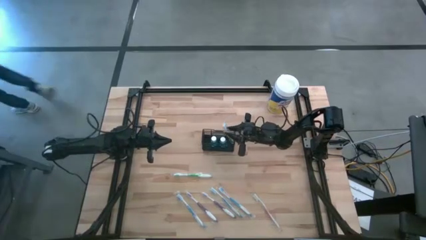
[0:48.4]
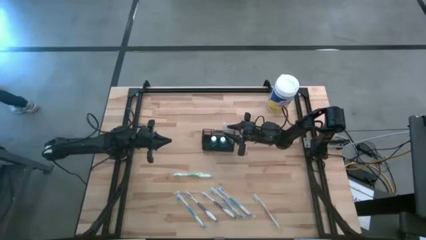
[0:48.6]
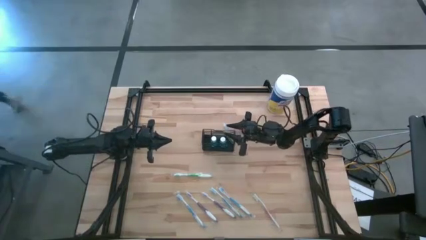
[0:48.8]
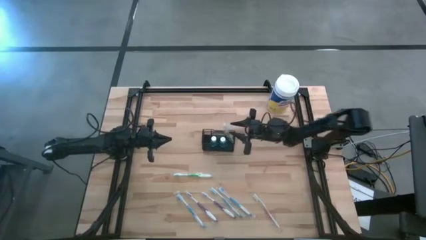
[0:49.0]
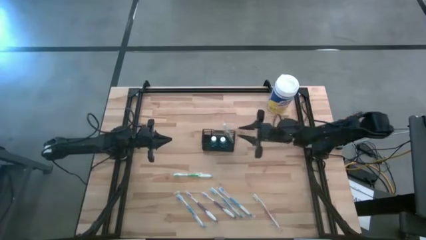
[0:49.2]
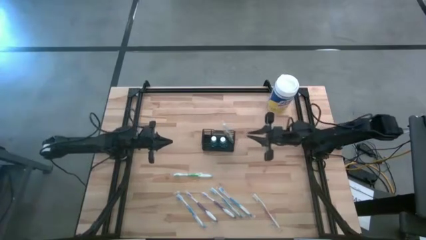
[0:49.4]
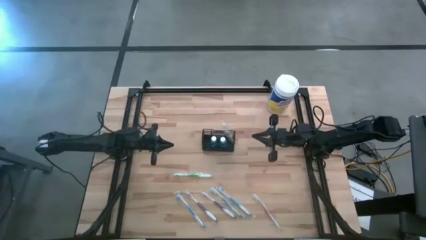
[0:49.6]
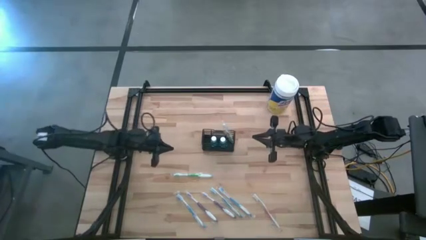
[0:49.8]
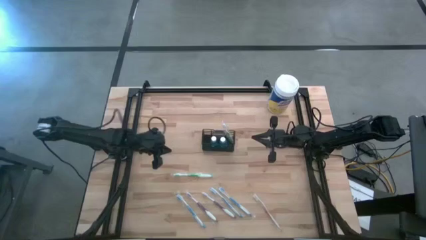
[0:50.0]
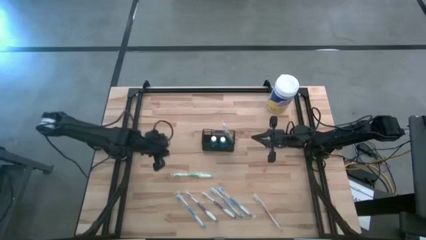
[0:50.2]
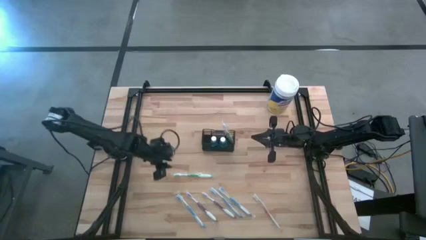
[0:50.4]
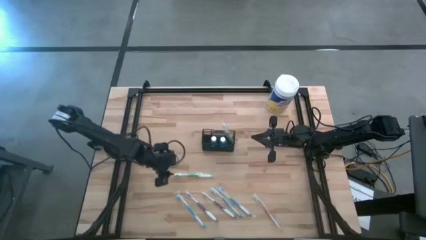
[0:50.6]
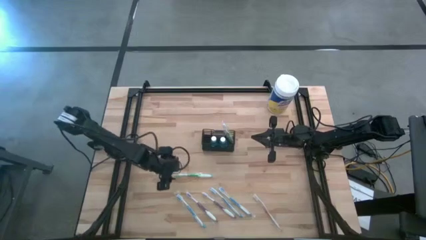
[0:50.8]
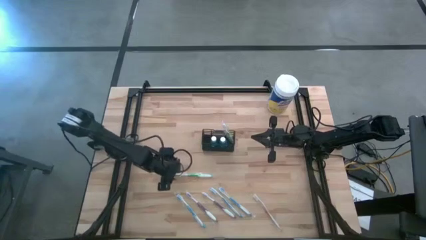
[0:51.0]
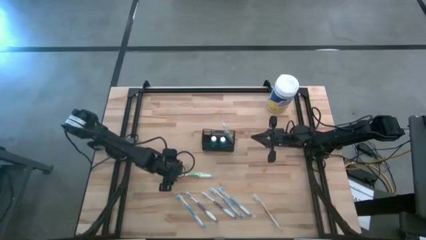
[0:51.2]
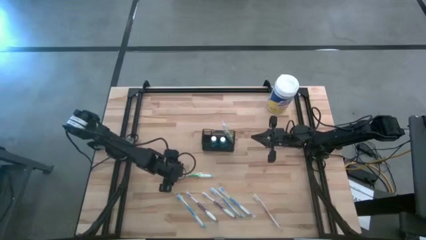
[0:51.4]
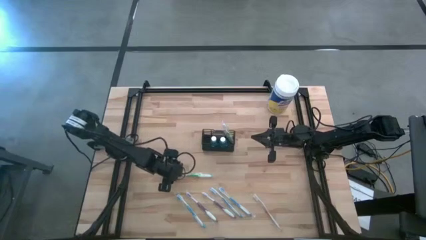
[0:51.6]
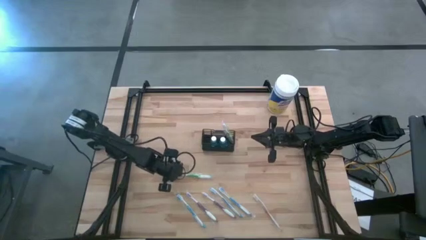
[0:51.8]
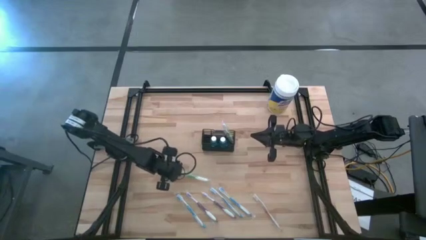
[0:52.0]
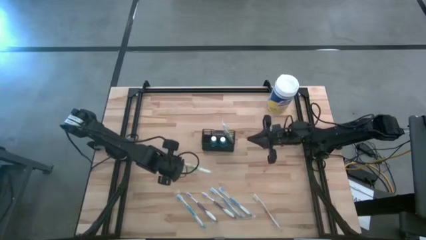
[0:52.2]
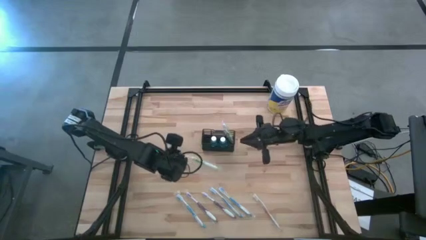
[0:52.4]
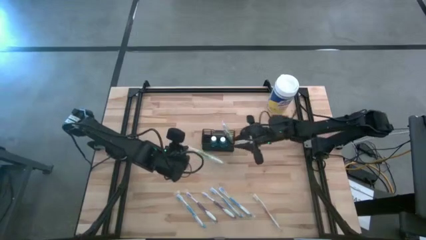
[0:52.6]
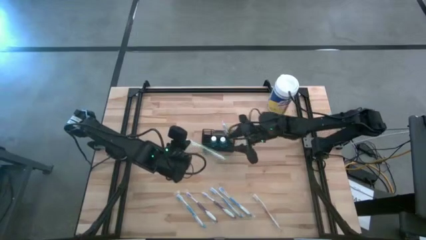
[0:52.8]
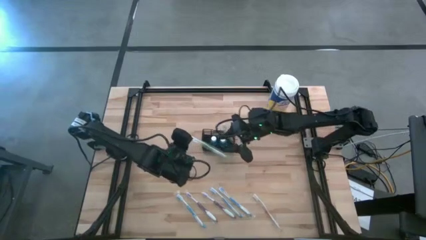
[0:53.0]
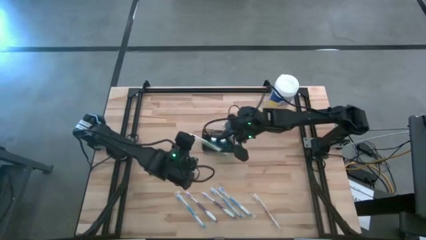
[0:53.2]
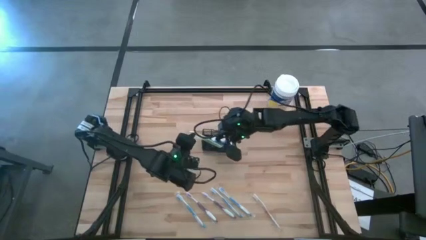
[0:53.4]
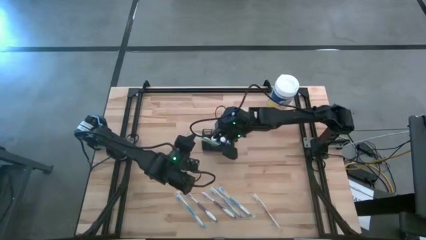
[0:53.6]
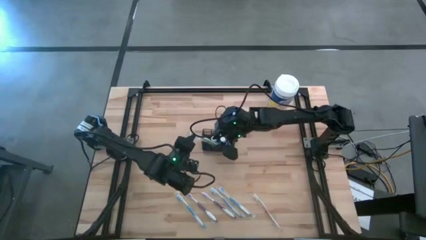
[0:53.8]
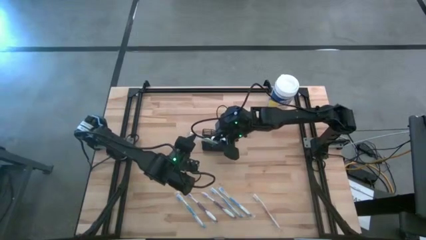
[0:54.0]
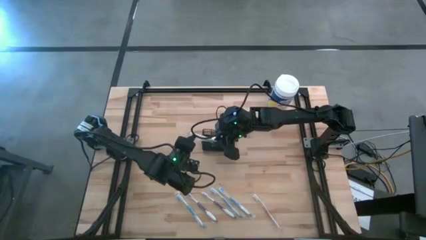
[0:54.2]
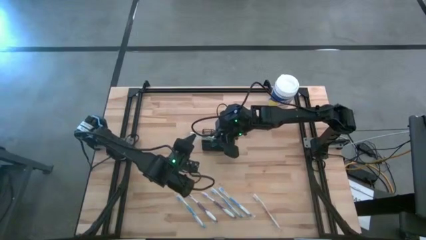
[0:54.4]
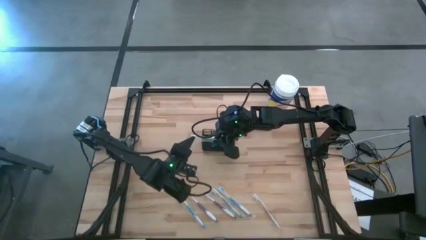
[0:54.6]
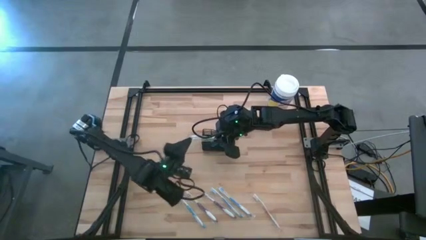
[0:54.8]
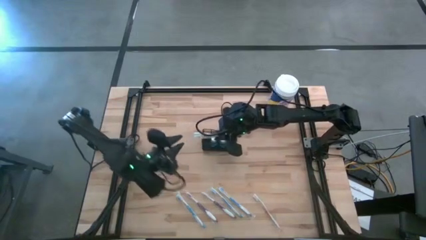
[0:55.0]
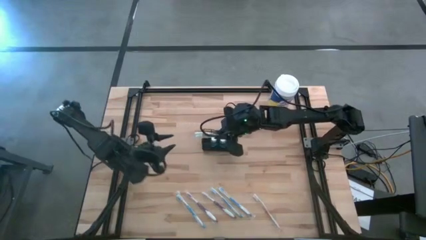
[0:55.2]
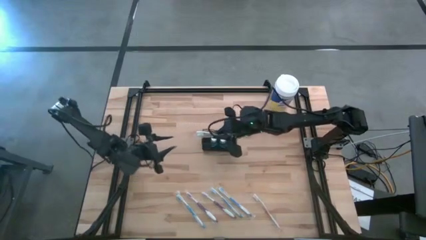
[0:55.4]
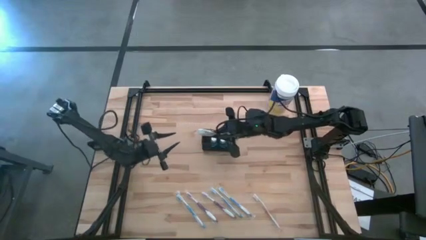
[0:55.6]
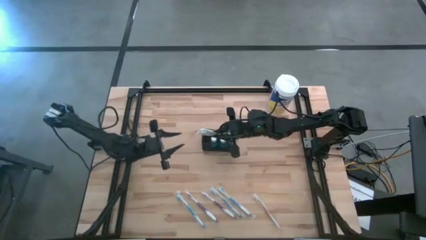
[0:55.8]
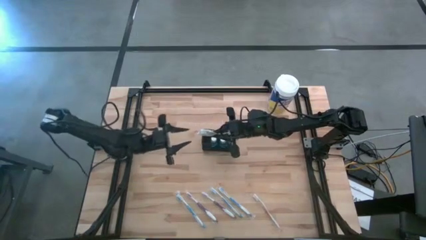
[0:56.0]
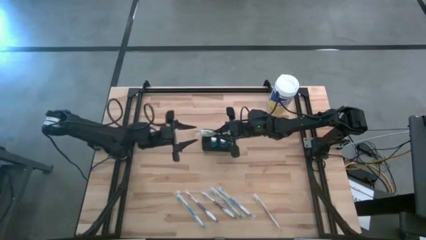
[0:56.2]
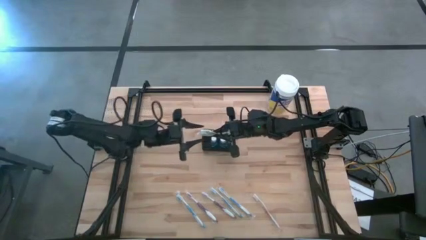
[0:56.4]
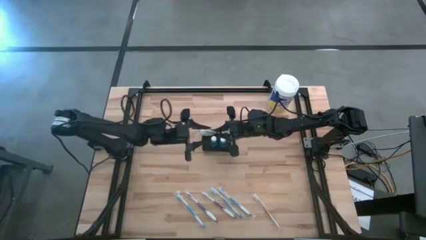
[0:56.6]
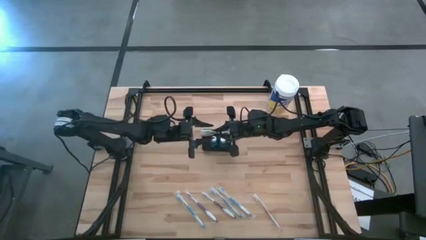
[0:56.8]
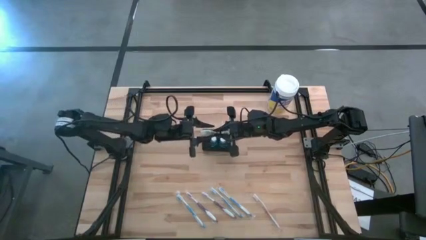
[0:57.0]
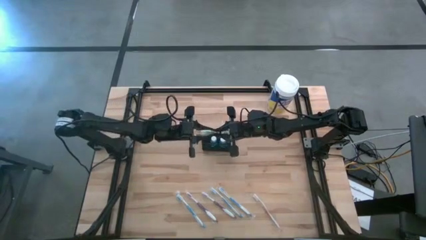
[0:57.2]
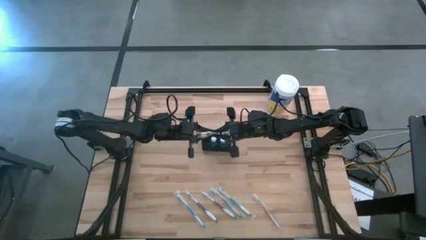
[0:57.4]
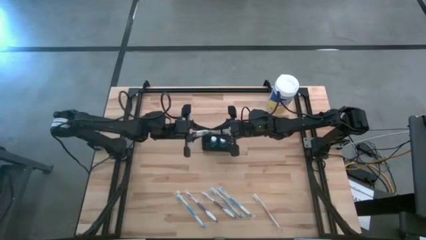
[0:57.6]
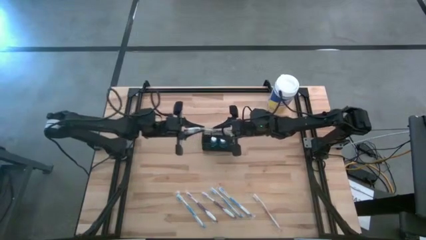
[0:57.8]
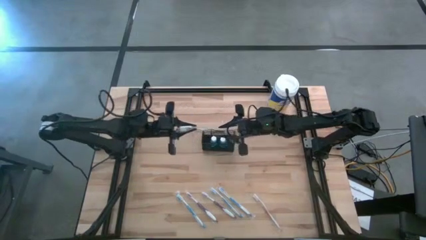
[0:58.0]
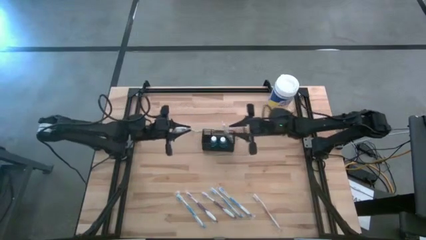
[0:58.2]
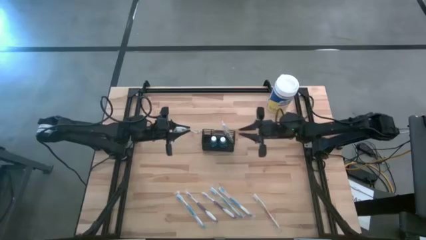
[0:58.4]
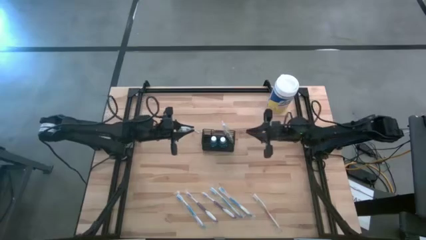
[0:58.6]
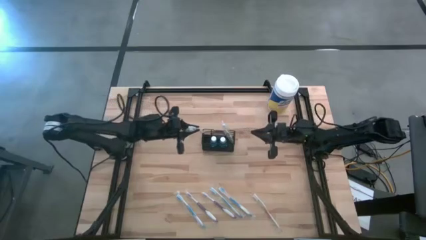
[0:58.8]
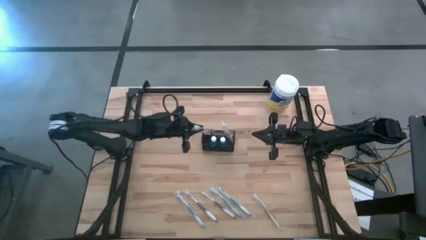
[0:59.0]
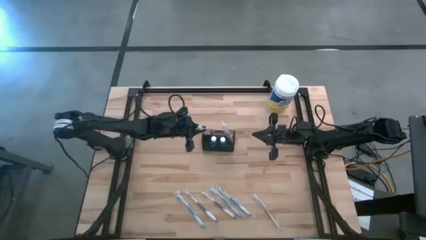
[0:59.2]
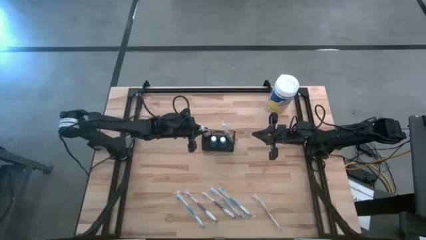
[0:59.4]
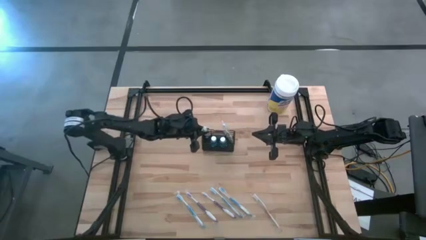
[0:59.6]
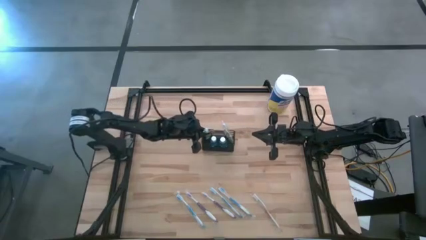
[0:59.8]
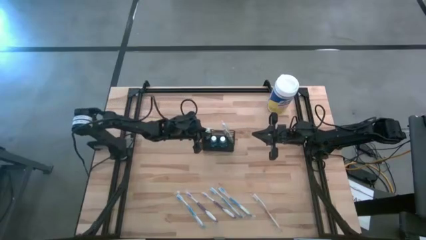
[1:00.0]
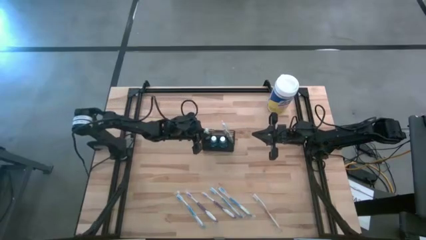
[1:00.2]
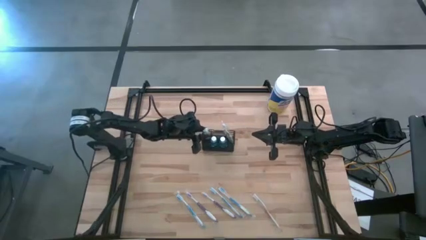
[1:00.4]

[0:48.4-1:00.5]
Task: Pick & Place toothbrushing station
Put the green toothbrush into the wire organizer

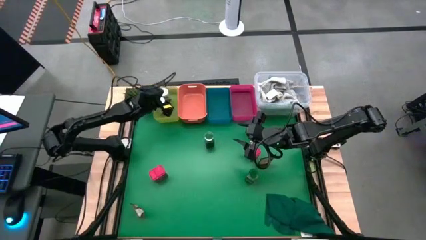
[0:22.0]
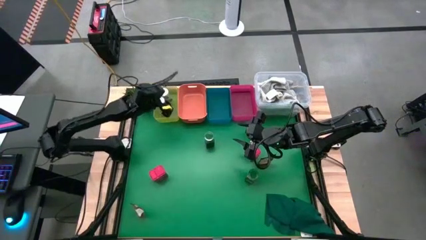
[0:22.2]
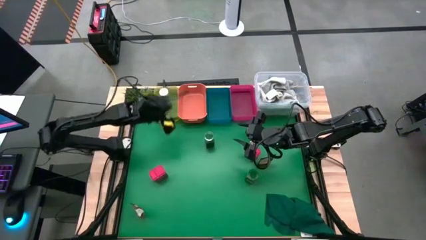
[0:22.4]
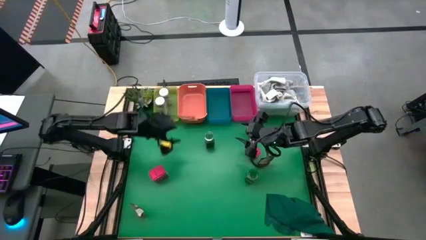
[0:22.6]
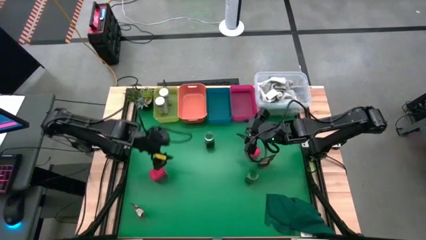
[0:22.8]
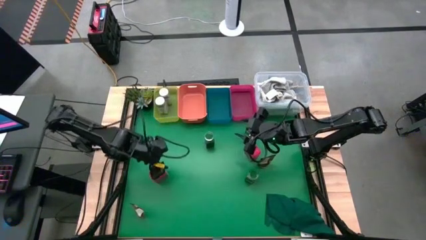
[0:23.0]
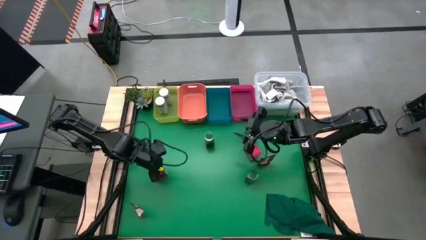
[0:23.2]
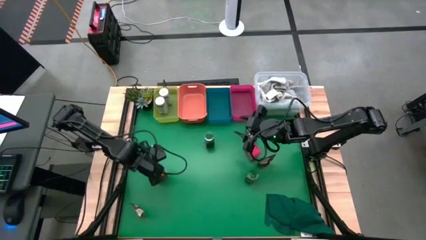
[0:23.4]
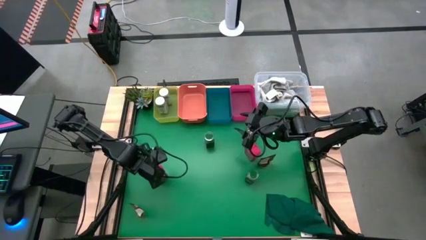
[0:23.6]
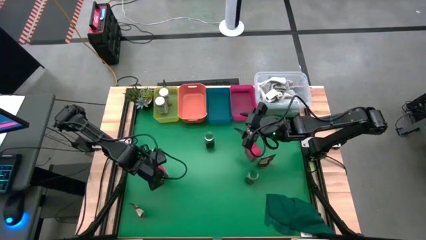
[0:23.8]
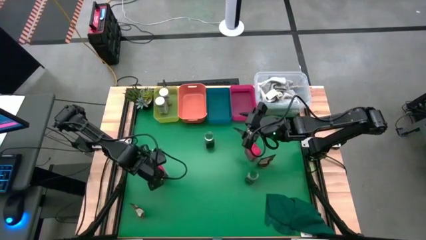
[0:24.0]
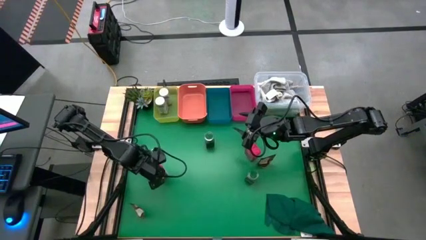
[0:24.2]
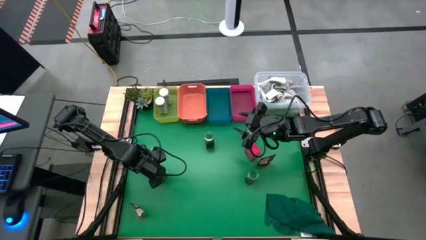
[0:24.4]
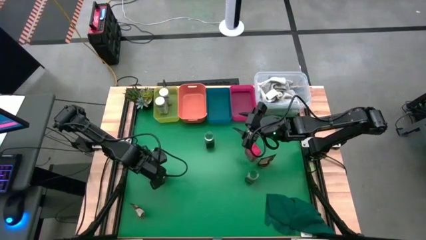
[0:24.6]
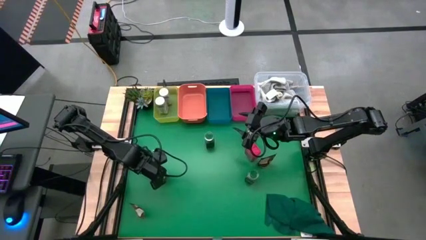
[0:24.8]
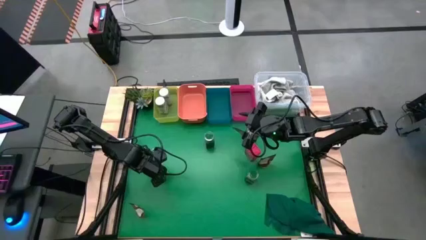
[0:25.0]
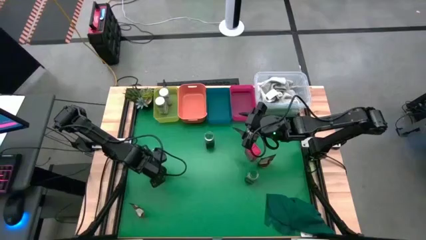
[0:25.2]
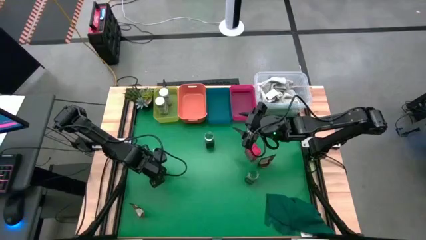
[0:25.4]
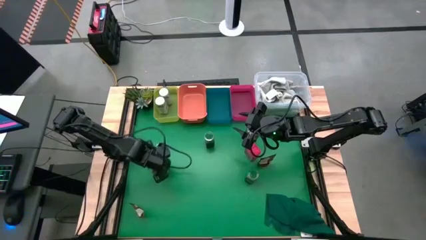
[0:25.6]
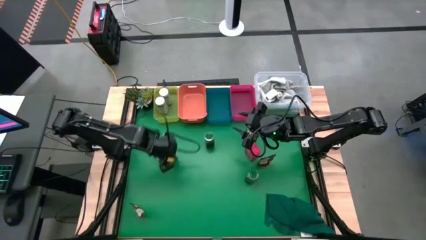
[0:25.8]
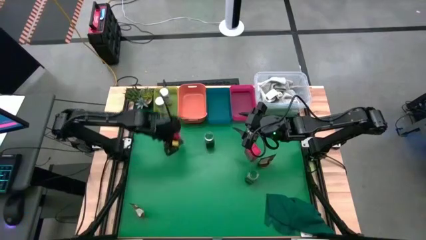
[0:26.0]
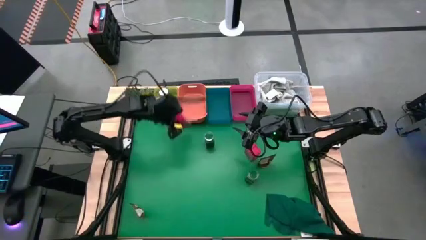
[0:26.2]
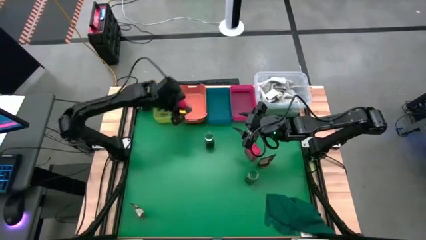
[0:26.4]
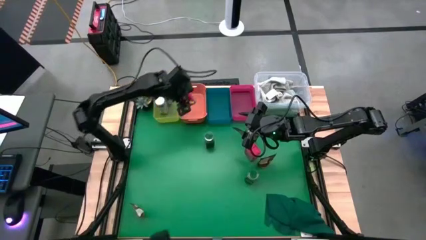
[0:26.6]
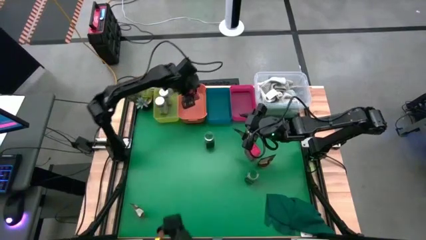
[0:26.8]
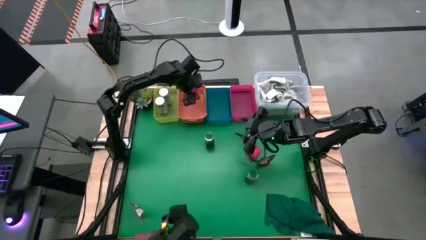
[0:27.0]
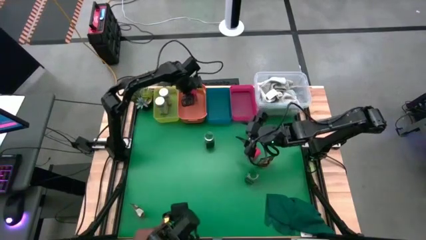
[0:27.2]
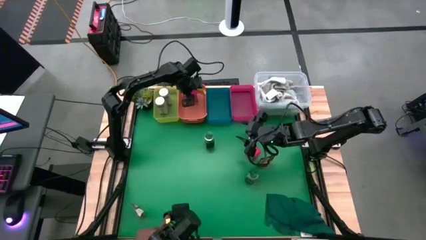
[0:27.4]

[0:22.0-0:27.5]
Task: Sort spices by type
Put the left red seasoning bottle into the orange bin
